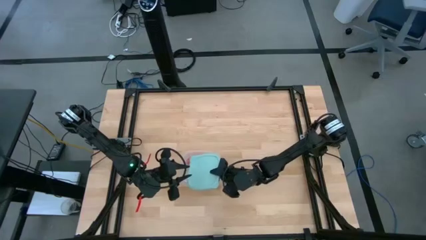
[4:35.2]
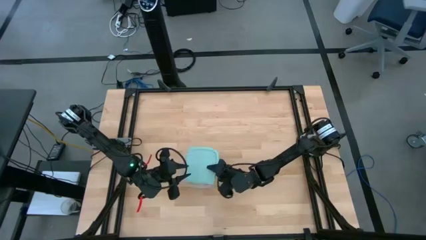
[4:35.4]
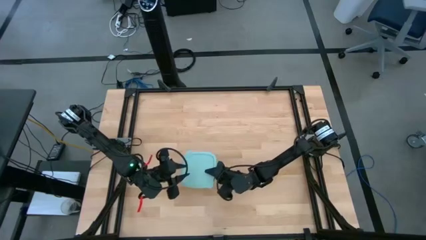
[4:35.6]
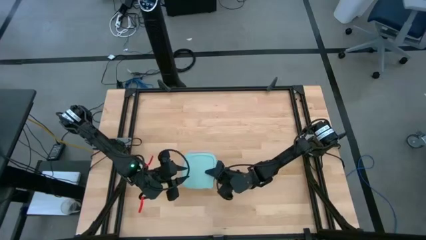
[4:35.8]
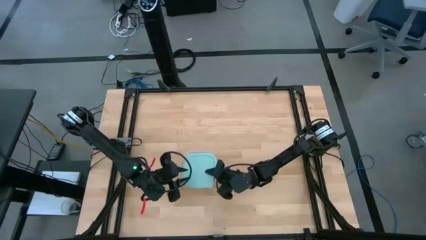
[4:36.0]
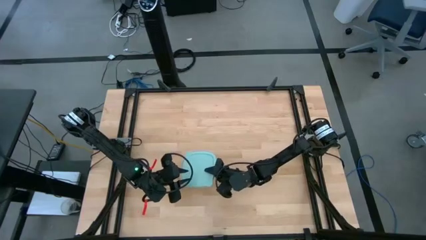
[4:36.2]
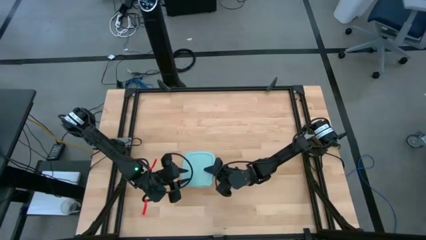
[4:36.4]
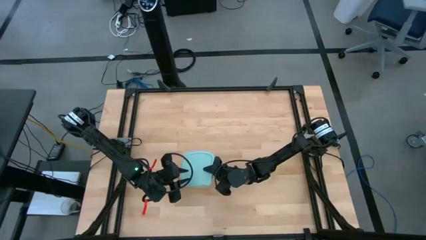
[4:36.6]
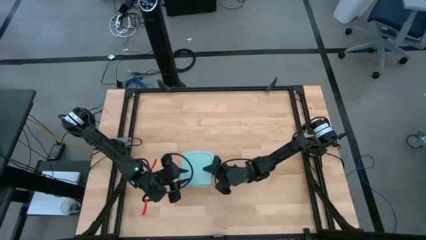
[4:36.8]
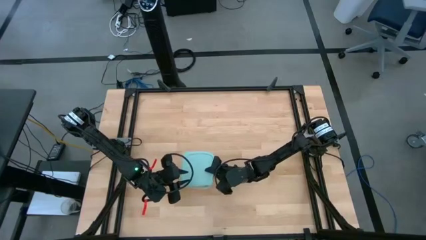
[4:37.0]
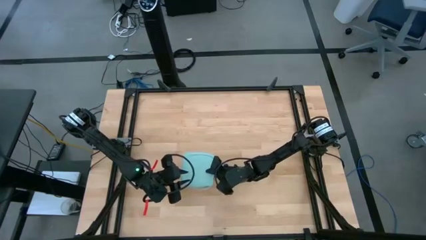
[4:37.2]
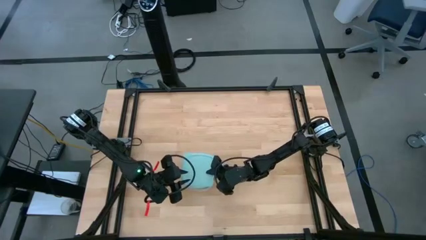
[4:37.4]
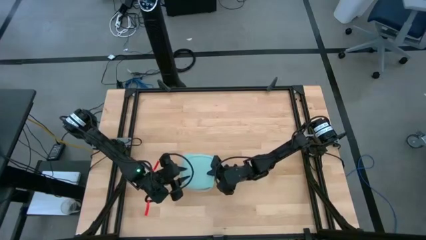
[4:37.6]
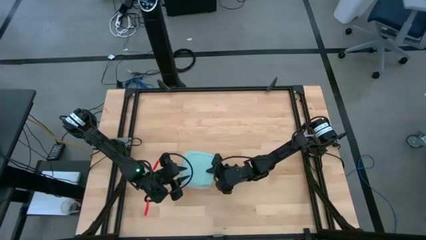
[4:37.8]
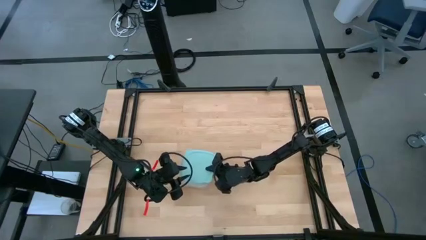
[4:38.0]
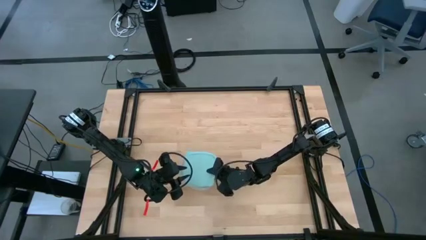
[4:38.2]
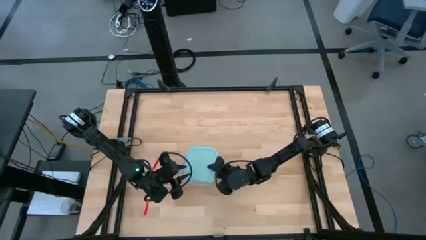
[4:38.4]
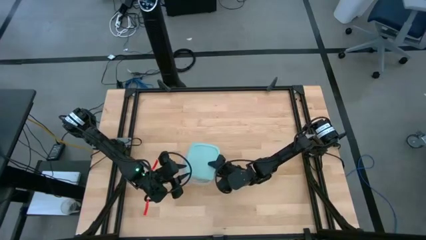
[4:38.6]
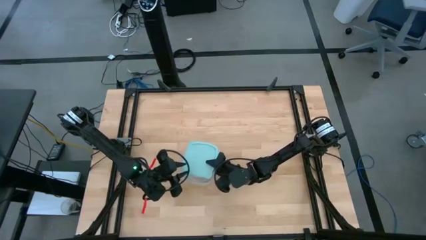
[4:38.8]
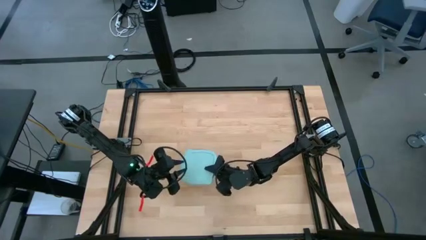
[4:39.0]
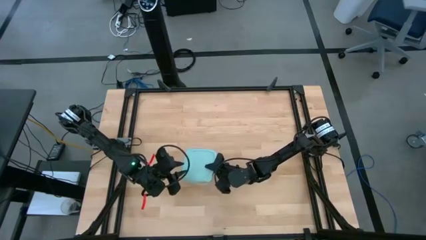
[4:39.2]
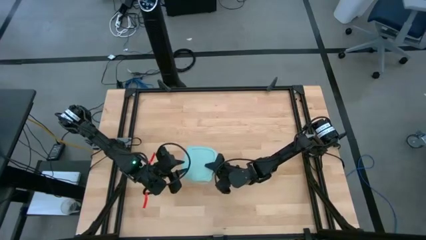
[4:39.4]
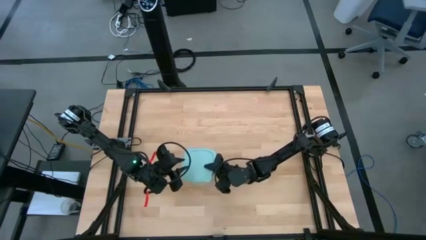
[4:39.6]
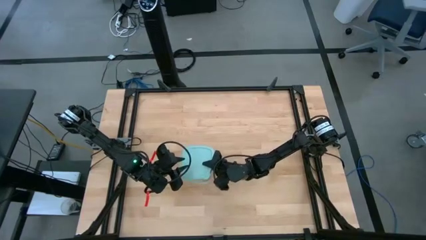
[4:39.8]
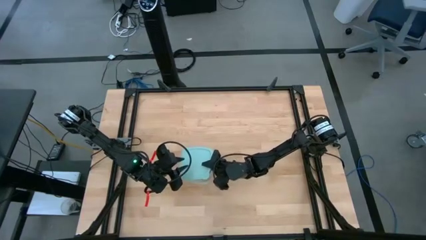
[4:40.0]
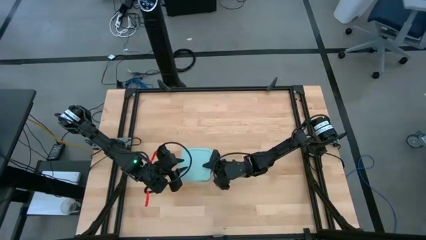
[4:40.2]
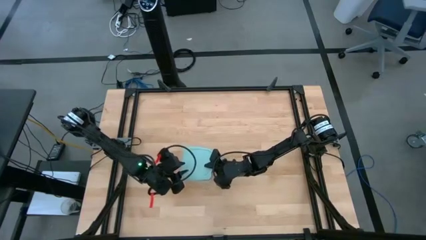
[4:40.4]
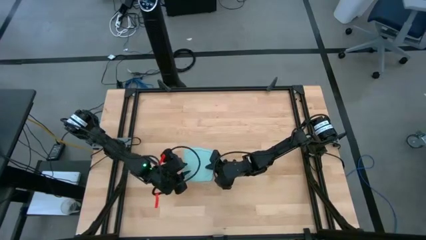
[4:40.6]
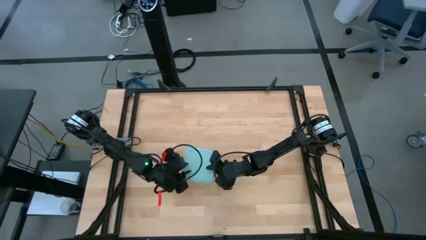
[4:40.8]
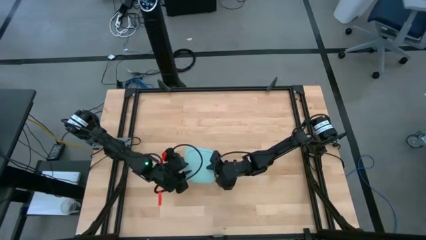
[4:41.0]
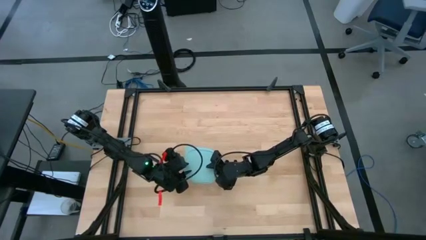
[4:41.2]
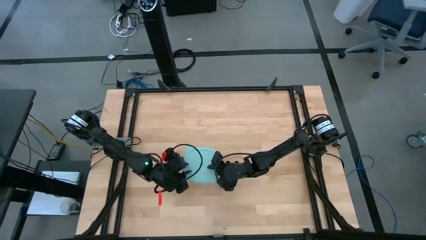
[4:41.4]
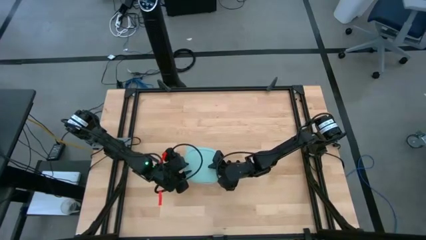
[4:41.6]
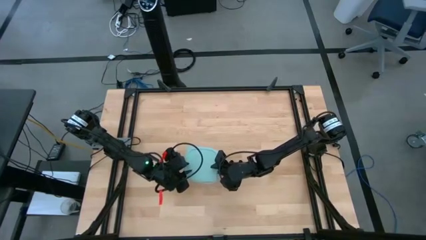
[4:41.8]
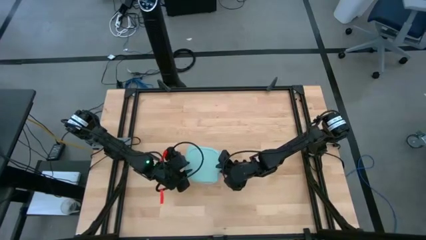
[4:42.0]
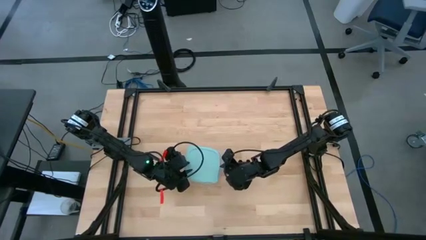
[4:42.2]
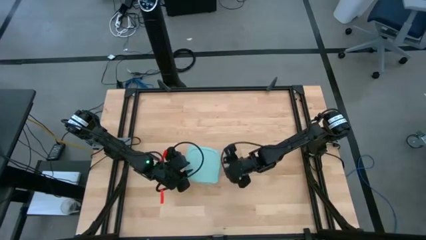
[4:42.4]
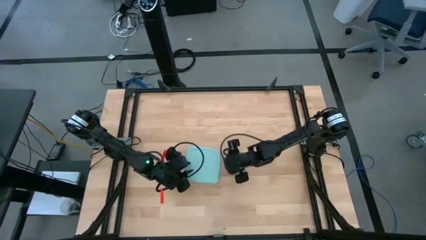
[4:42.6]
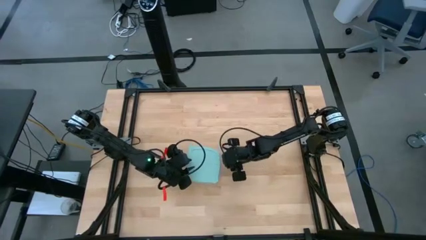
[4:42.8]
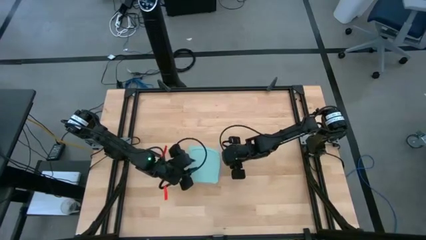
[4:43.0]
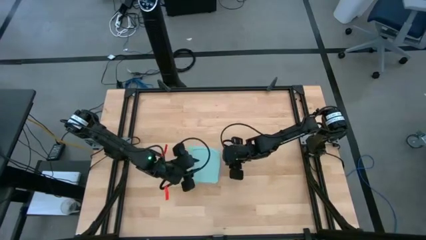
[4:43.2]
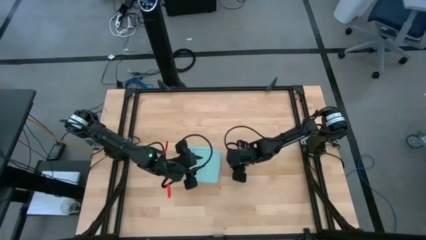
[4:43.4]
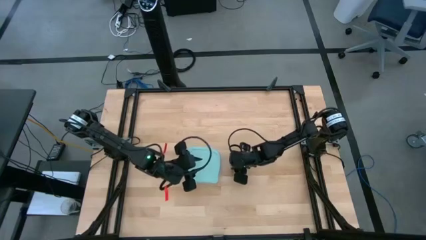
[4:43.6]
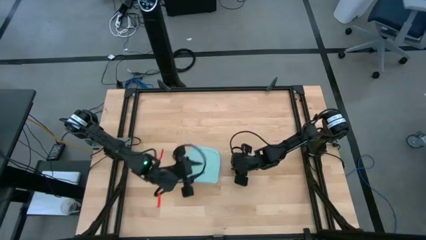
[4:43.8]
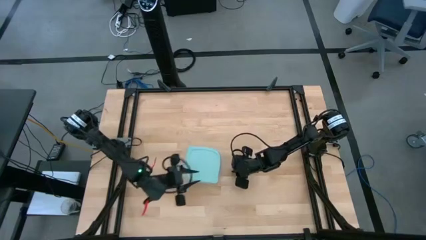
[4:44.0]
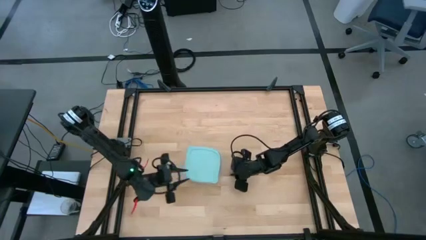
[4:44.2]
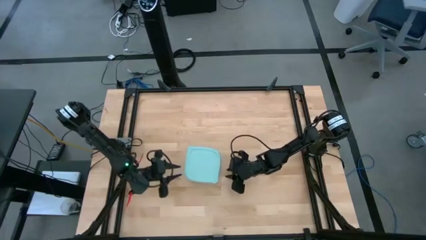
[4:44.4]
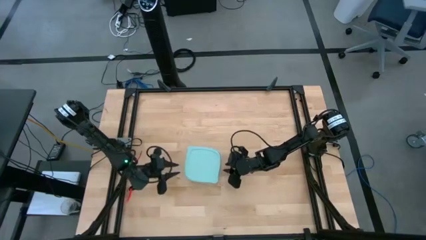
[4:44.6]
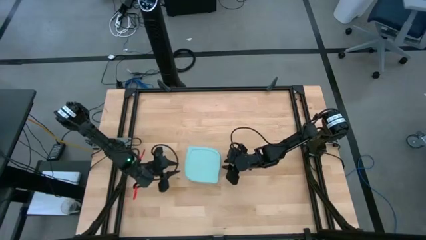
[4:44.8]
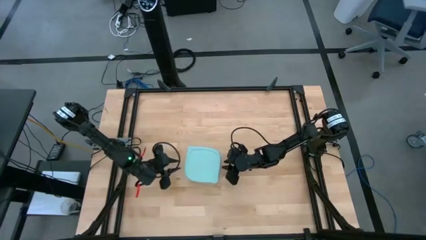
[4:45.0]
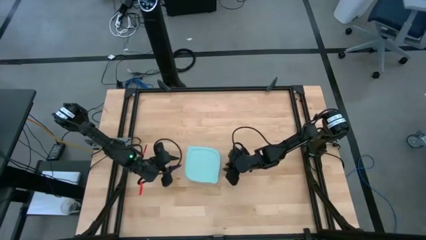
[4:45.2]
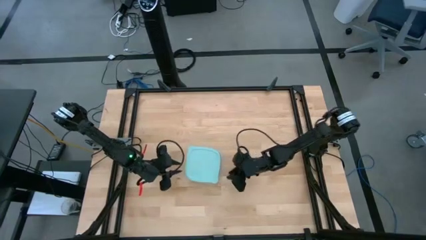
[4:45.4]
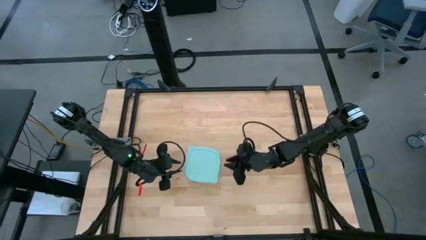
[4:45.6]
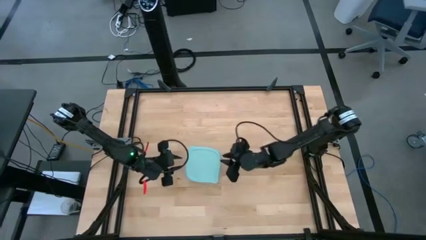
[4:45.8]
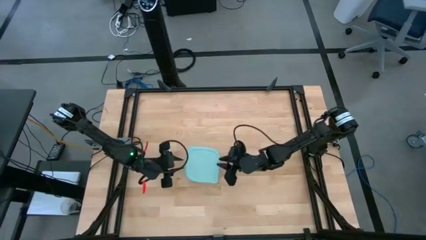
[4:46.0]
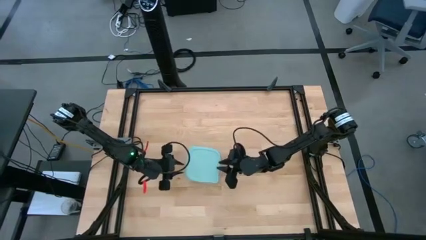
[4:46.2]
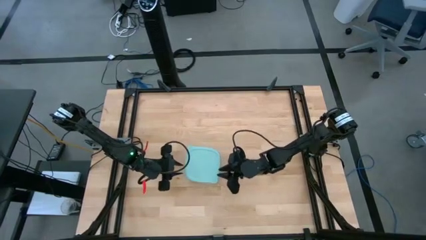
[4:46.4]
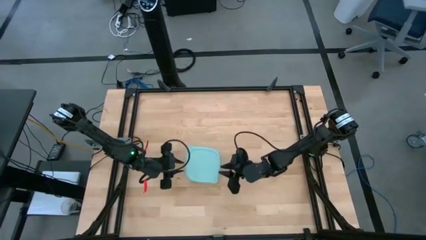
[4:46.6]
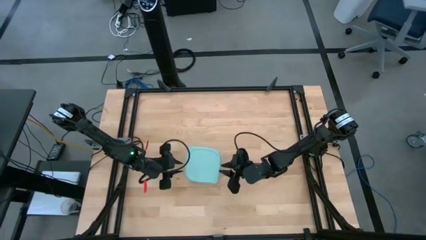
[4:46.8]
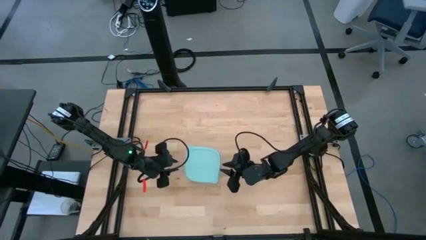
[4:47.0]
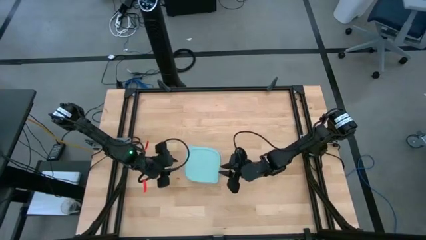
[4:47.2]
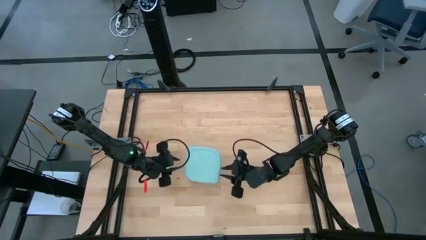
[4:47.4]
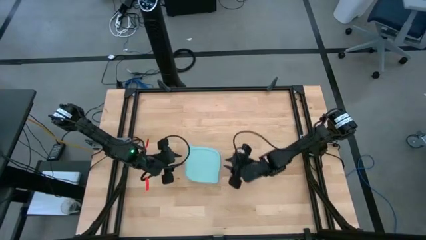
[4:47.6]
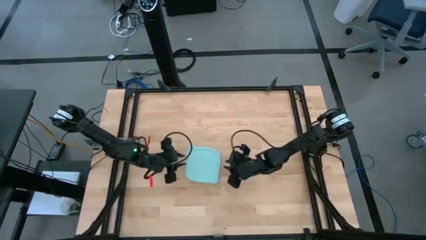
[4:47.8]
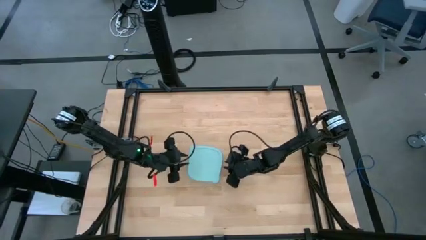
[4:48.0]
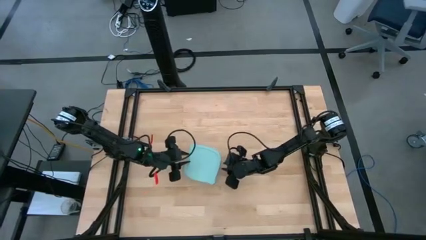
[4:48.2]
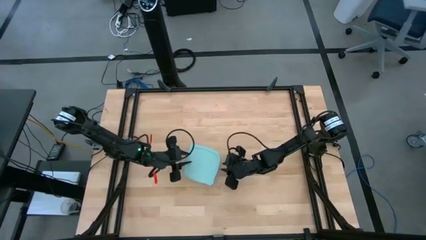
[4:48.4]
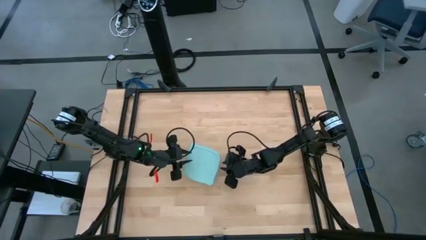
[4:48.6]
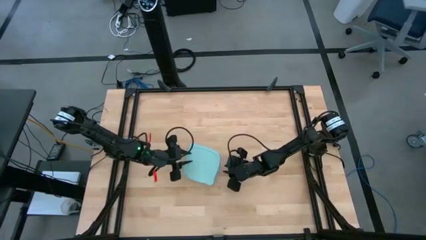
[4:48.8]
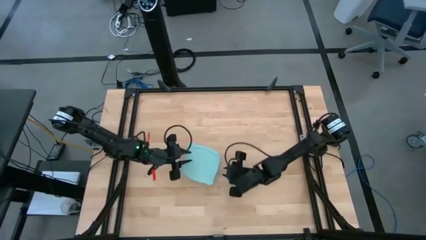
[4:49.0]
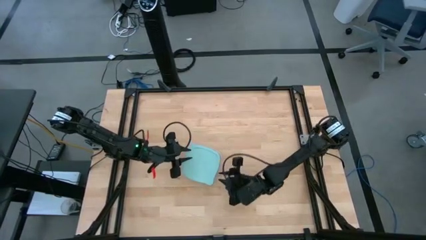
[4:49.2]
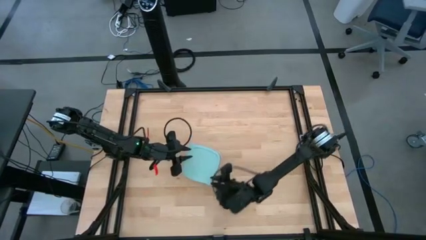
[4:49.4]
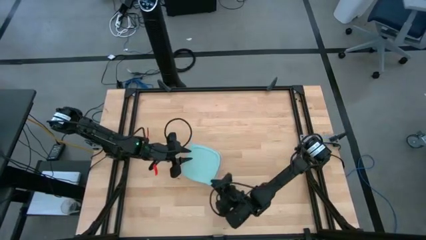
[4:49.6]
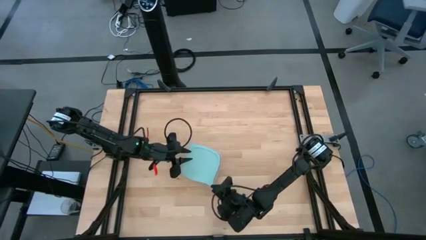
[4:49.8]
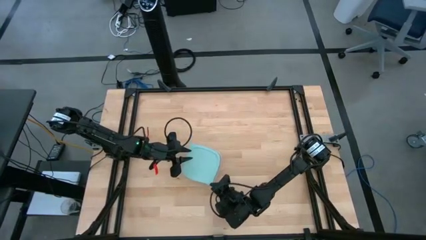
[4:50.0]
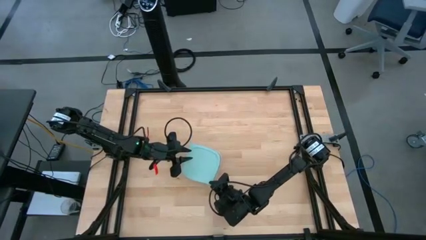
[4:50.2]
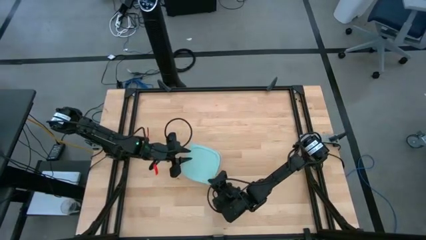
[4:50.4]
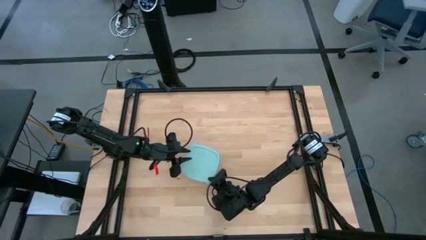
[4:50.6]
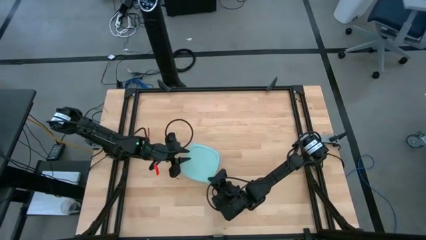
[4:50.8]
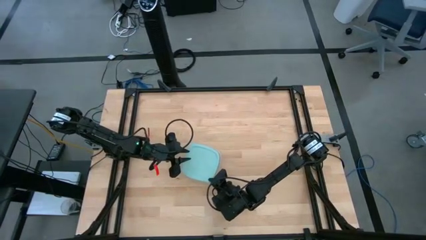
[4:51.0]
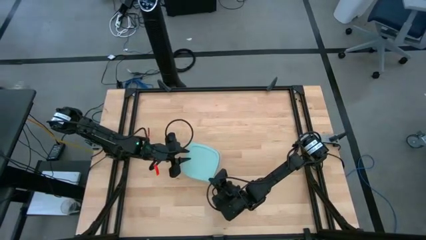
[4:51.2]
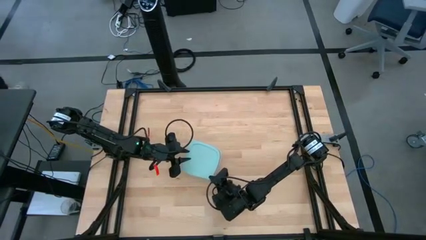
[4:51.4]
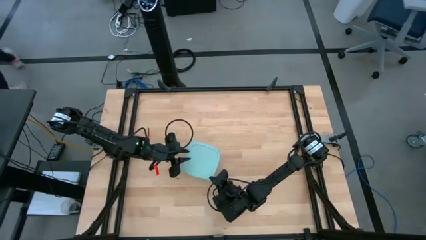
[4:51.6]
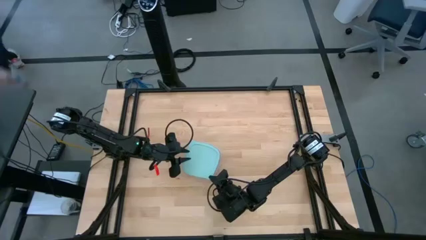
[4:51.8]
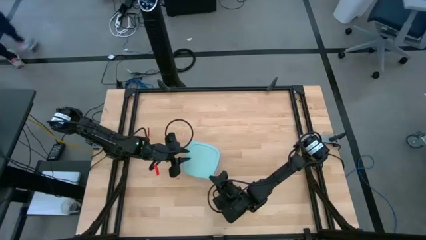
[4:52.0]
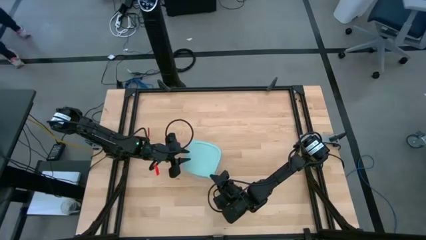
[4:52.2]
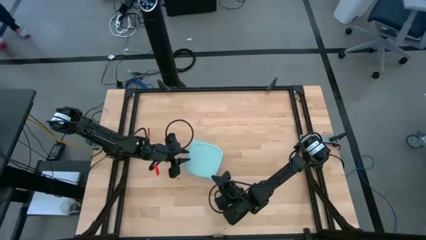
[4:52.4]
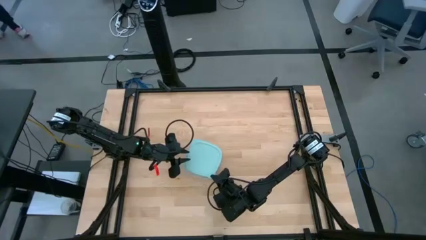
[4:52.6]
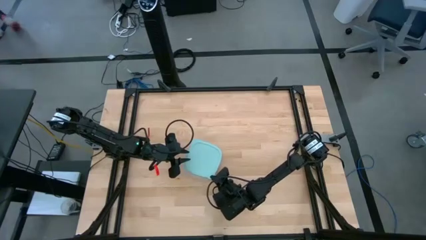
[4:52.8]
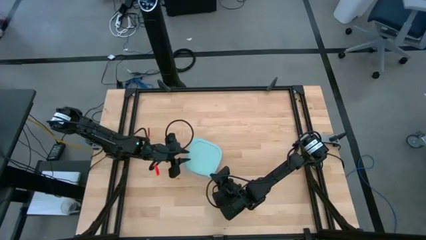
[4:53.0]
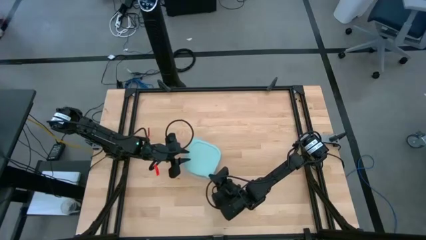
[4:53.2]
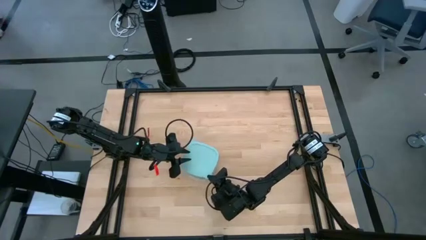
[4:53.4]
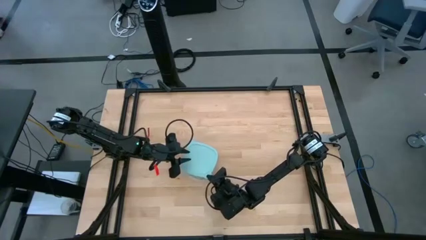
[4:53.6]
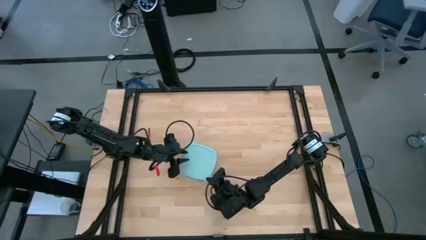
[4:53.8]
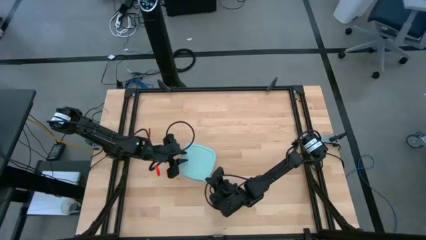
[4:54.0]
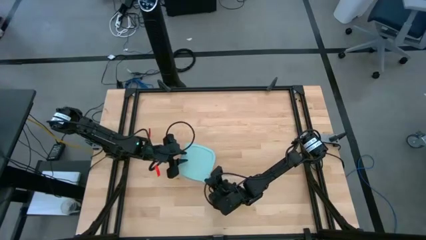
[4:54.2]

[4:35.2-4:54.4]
Task: Roll bandage
Close the transparent tupperware
